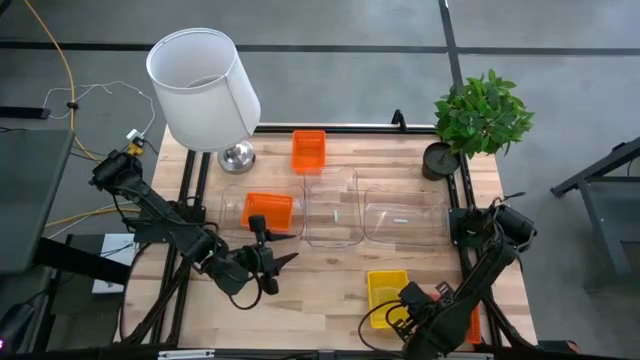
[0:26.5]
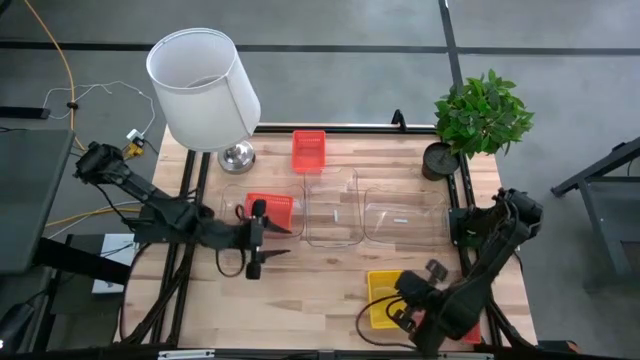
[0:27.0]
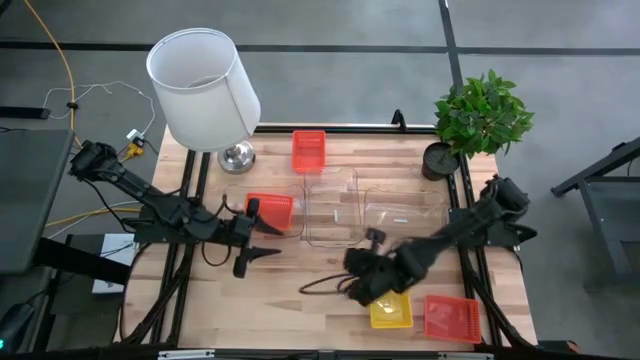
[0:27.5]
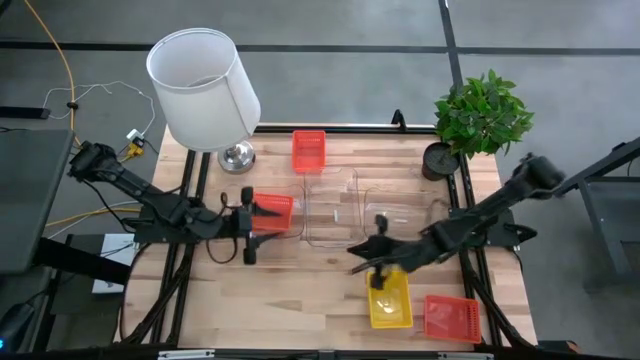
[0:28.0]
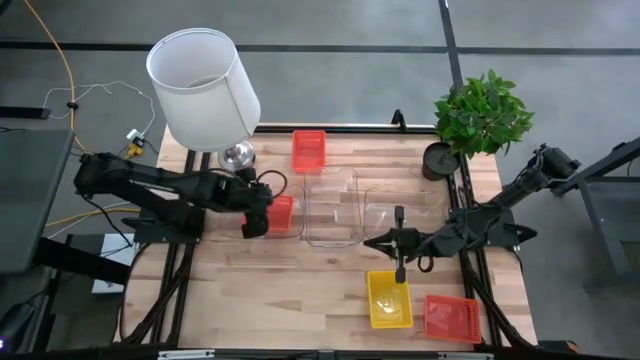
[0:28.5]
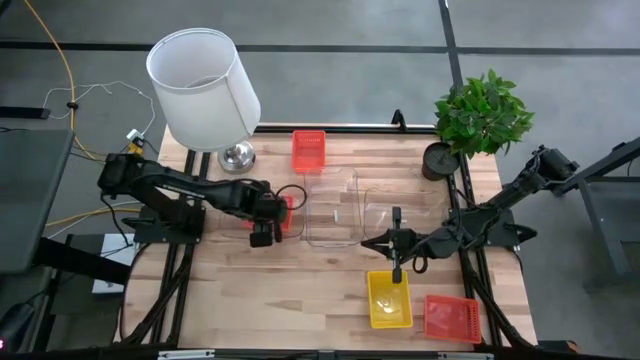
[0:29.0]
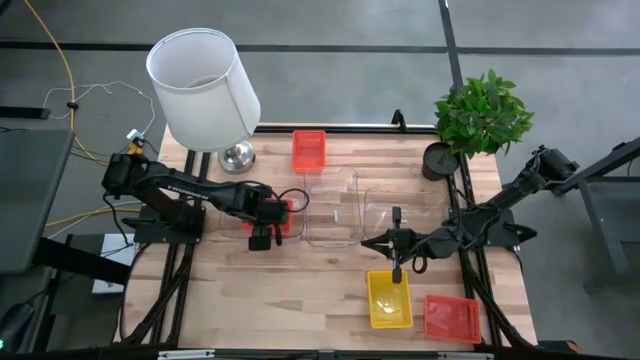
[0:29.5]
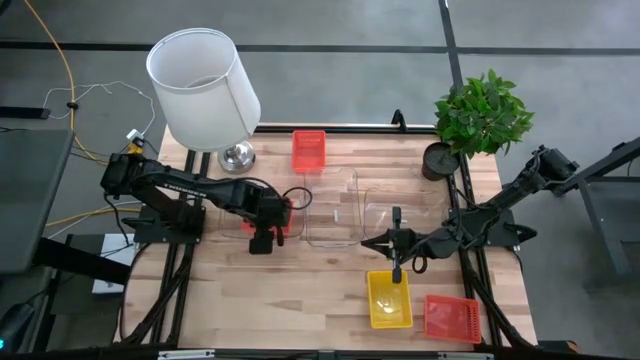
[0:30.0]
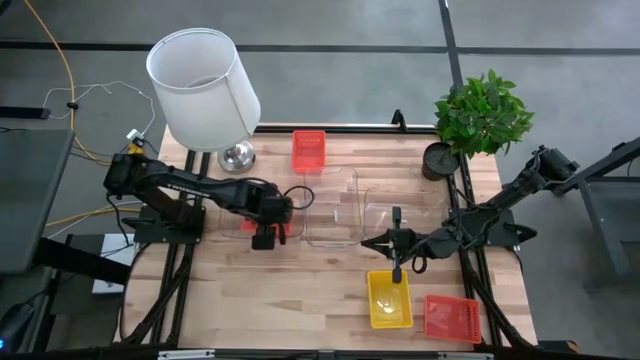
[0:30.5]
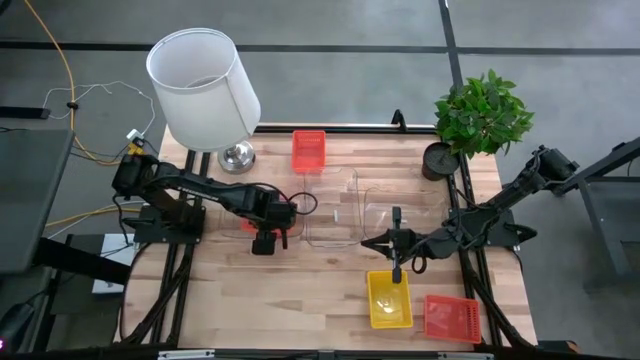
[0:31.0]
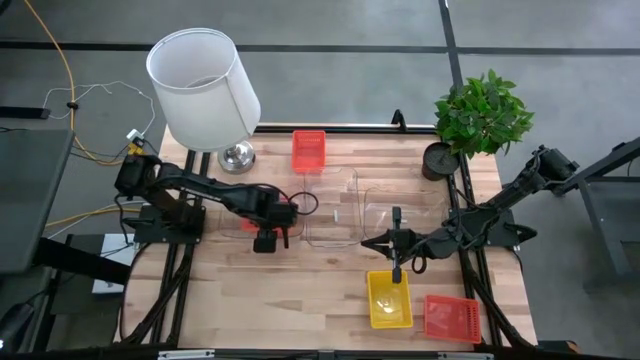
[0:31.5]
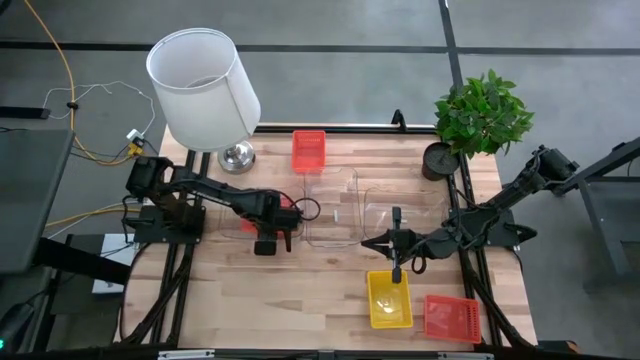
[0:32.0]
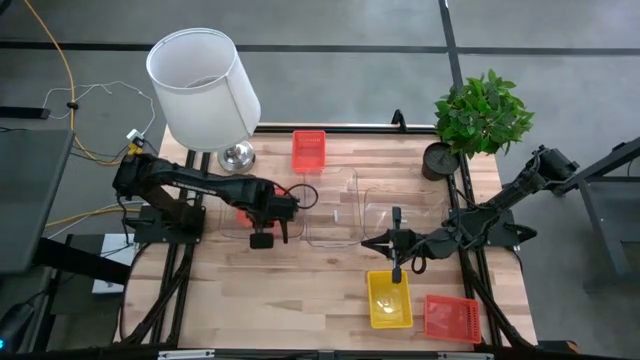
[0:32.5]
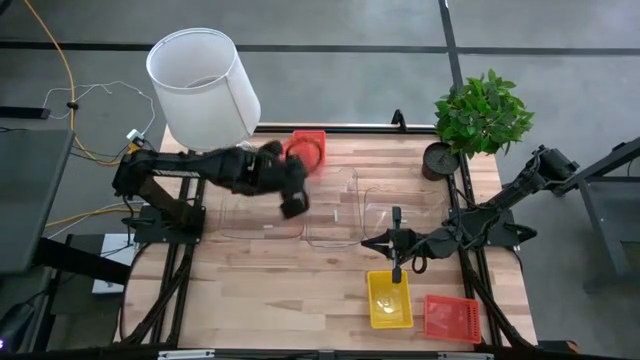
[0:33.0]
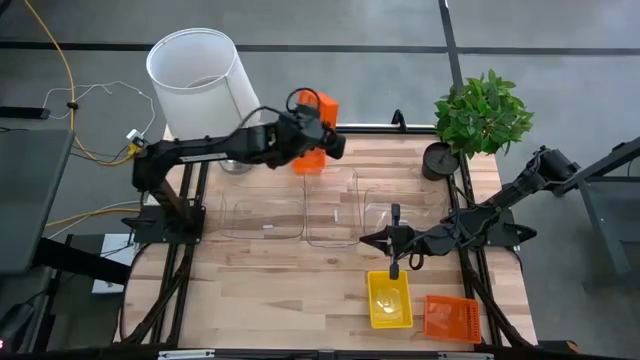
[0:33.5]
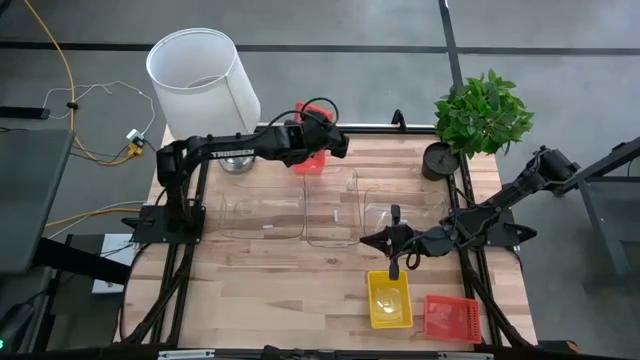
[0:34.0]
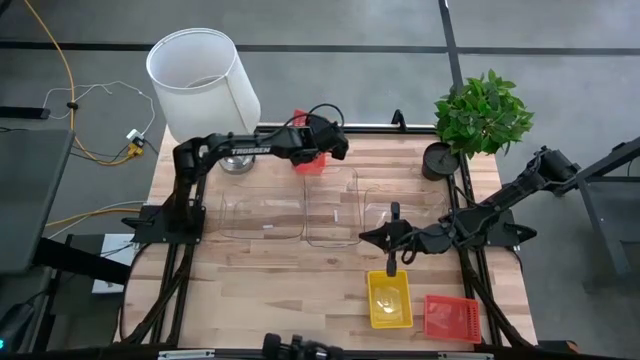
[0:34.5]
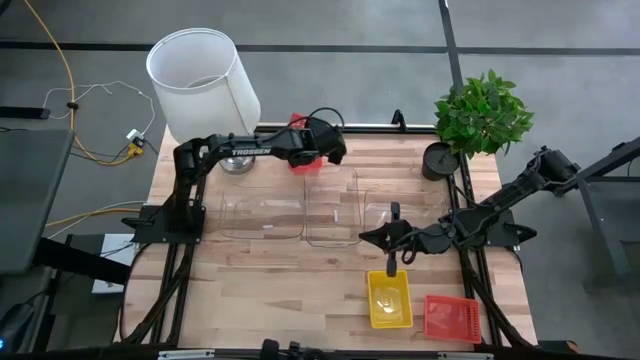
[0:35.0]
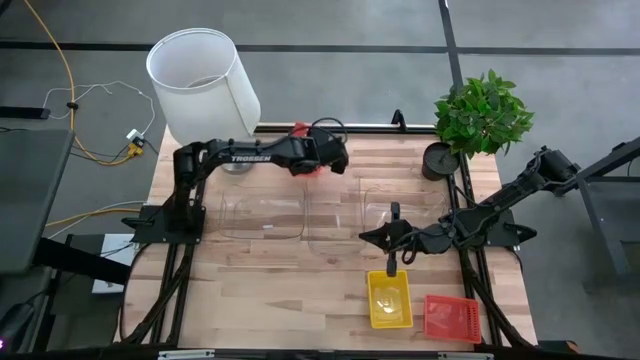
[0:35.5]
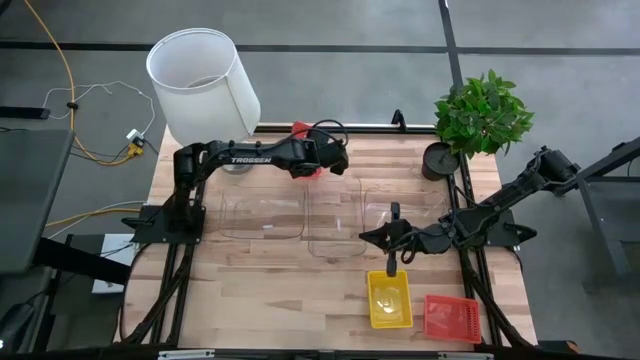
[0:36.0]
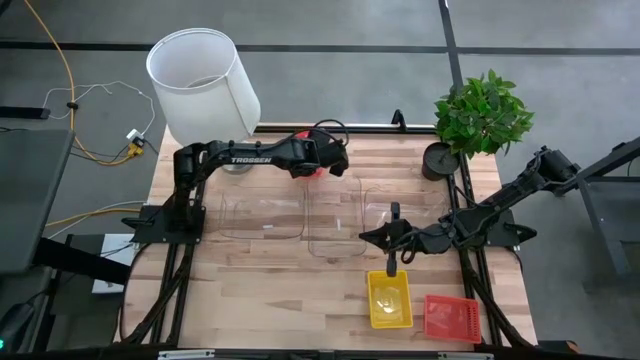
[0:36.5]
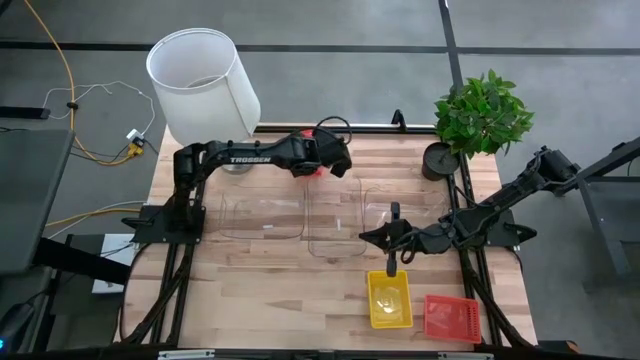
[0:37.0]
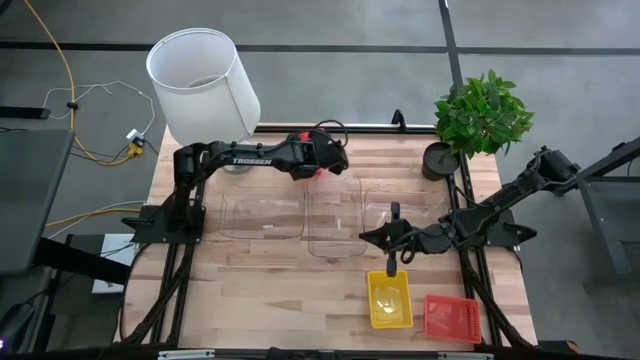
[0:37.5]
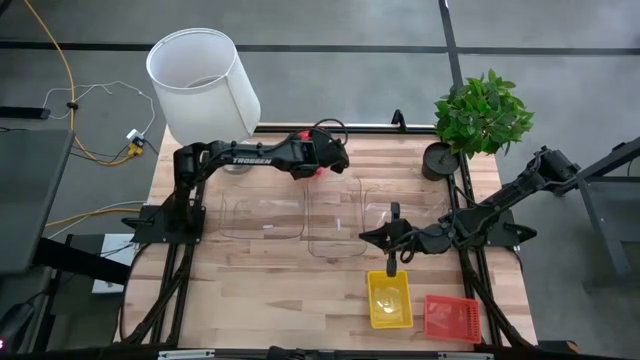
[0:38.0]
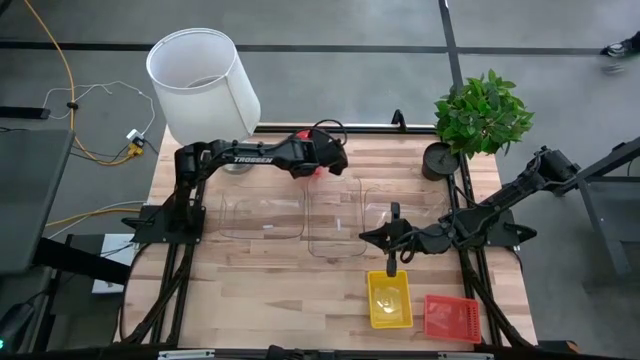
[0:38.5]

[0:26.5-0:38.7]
Stack the middle orange bin on the top orange bin

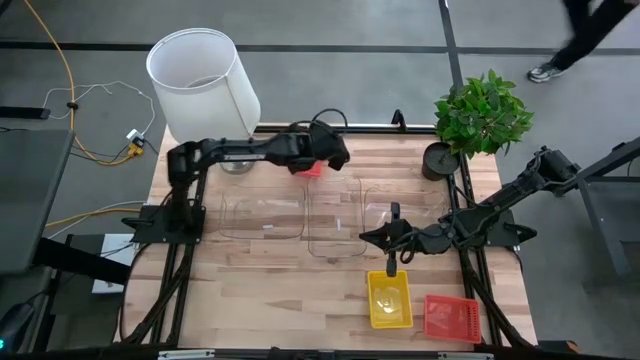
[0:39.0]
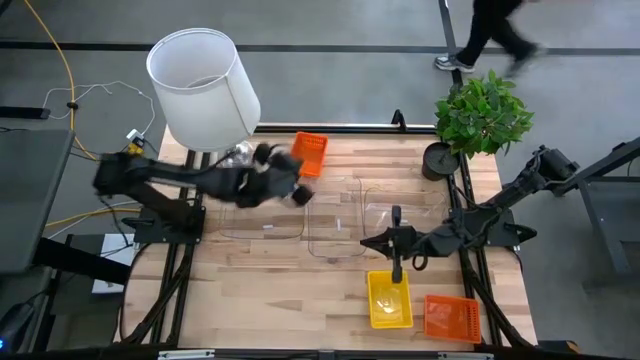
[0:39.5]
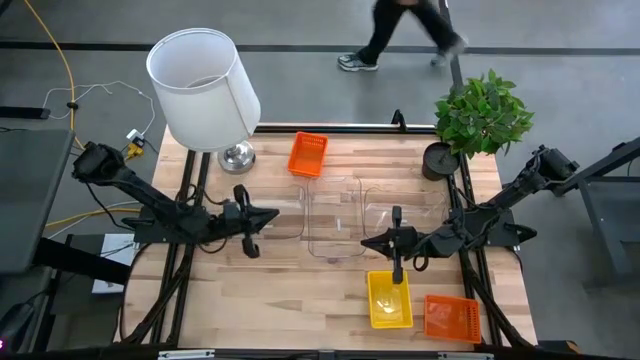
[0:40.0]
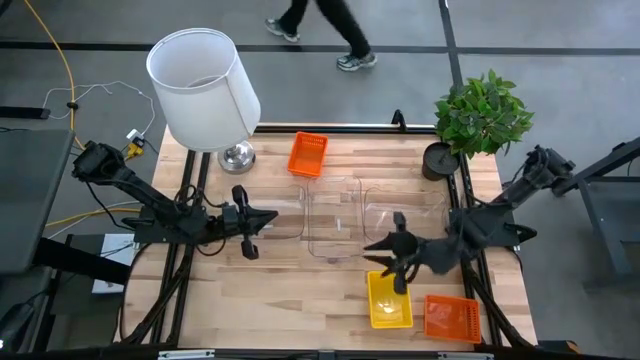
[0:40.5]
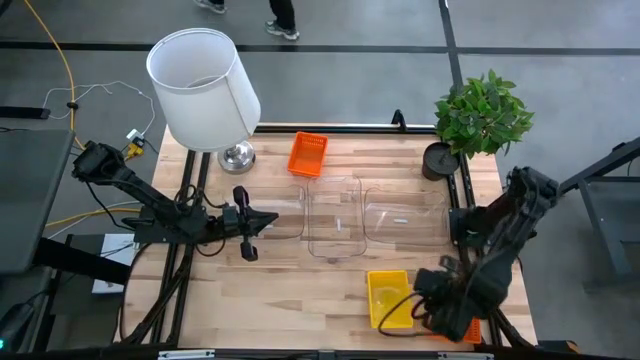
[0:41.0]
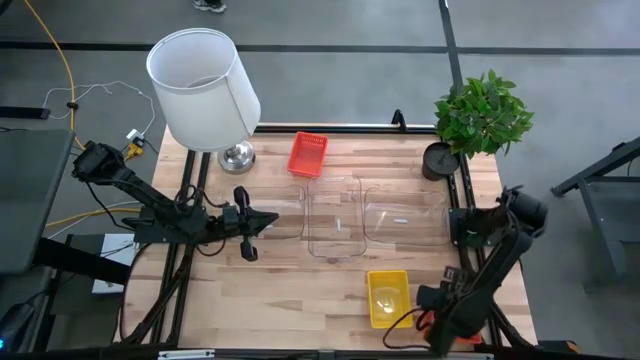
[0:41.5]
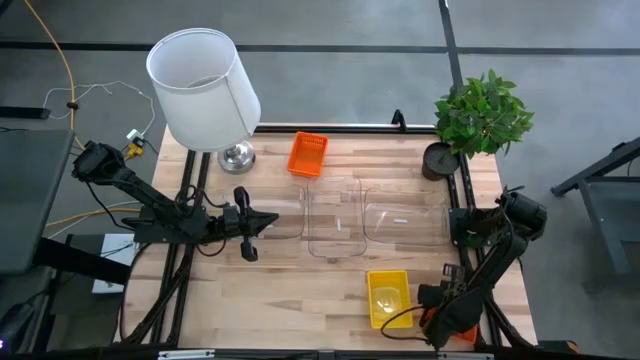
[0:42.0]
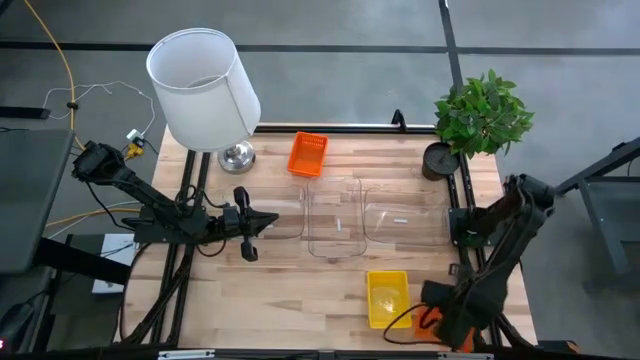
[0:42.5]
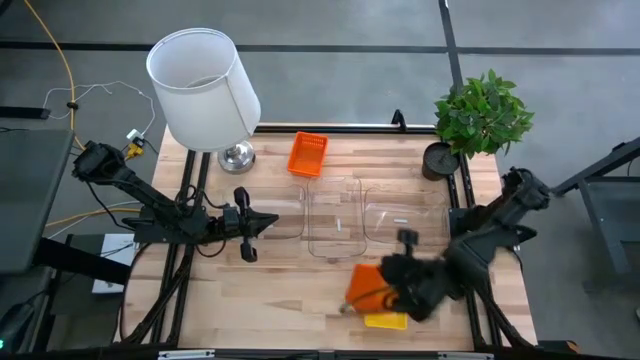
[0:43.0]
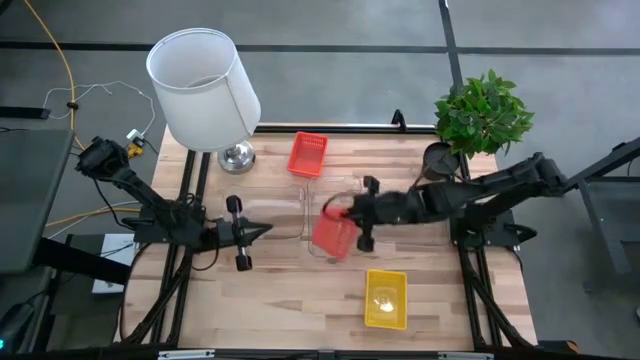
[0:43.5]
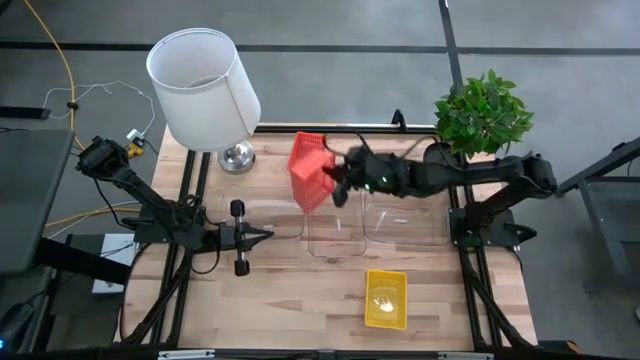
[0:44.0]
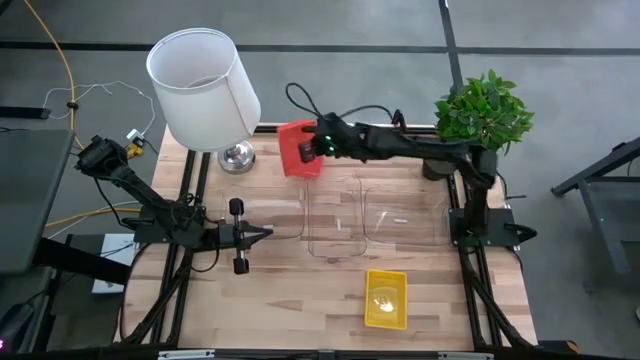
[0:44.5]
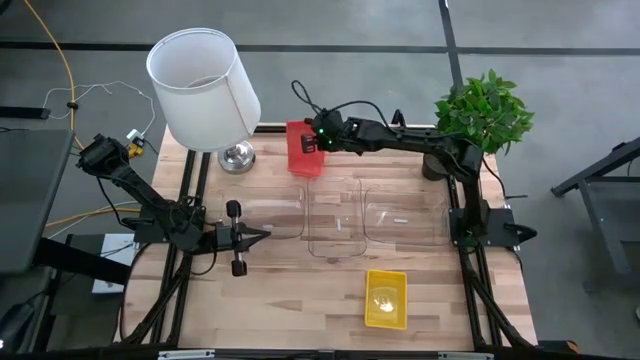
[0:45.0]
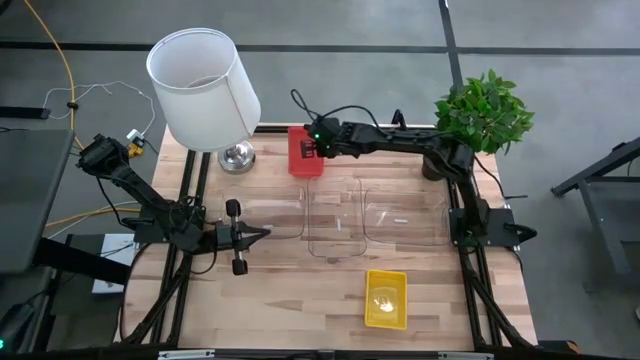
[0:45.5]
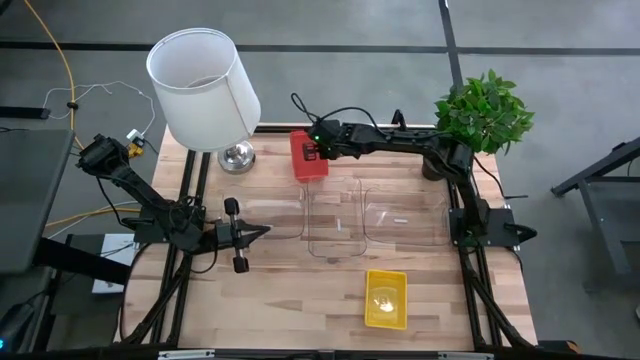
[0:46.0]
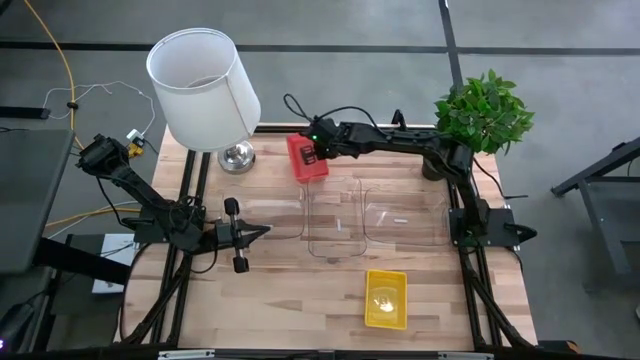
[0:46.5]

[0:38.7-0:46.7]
Stack the bottom orange bin on the top orange bins
